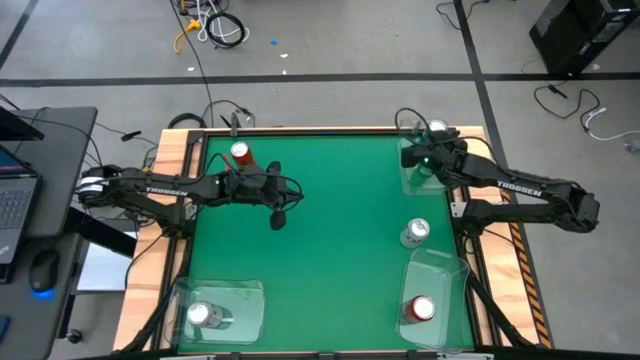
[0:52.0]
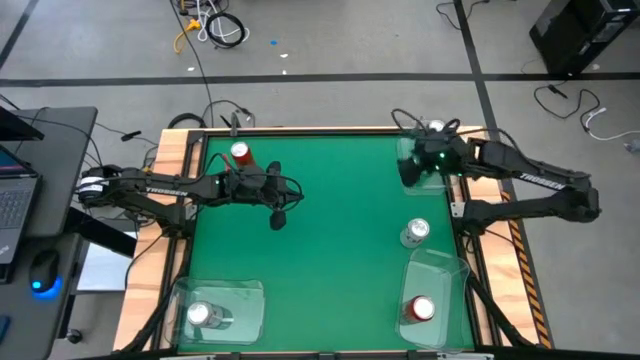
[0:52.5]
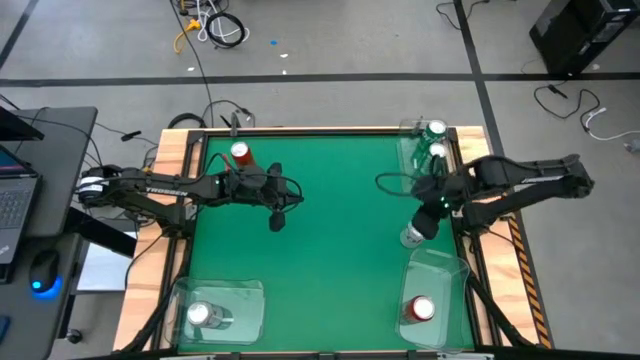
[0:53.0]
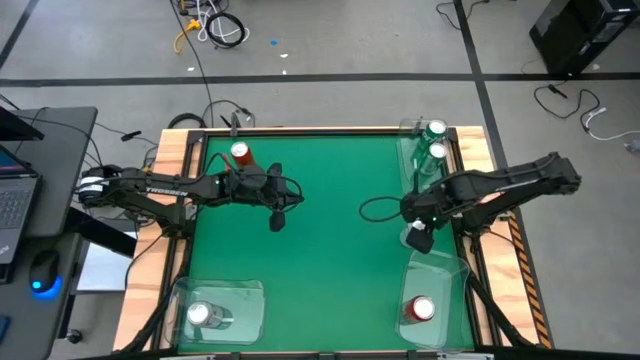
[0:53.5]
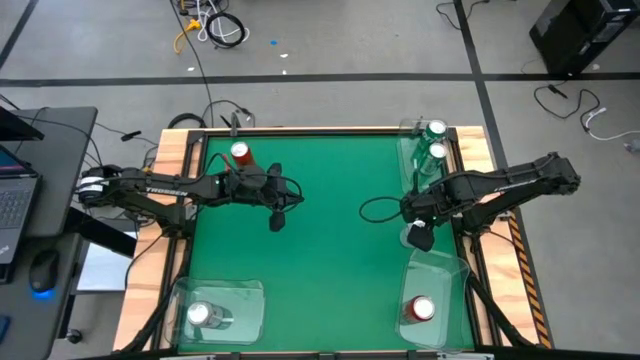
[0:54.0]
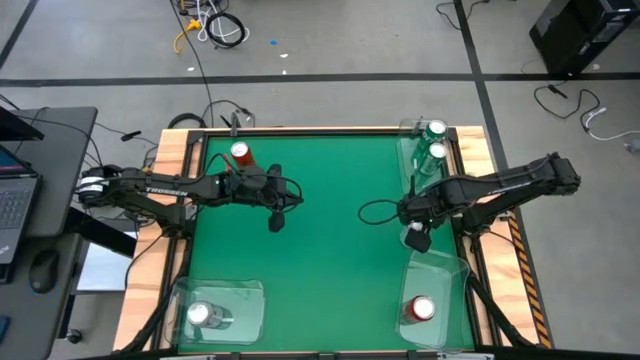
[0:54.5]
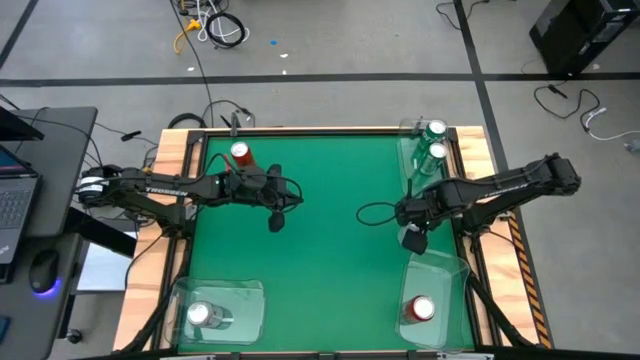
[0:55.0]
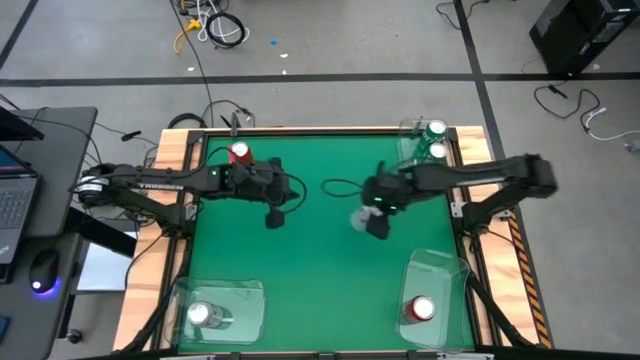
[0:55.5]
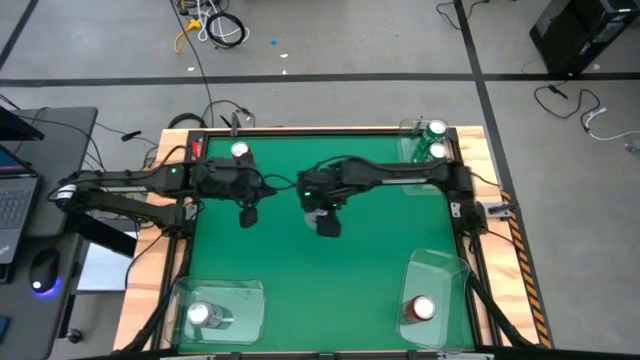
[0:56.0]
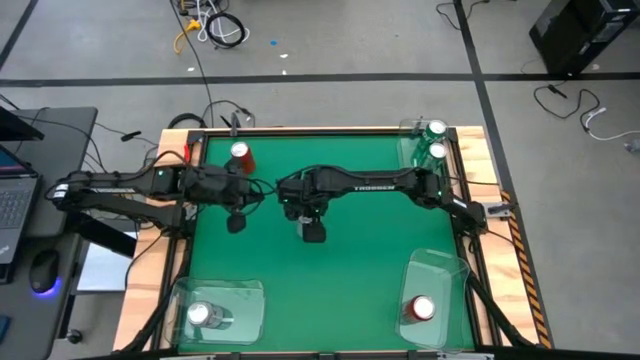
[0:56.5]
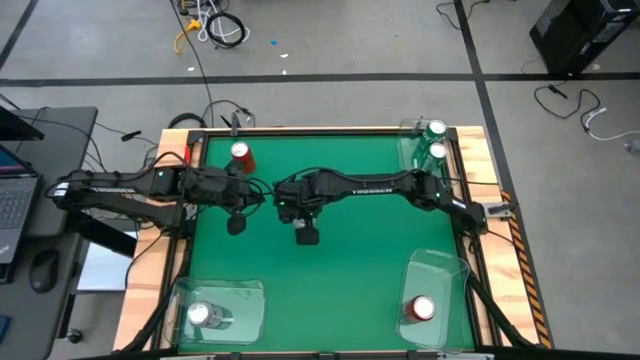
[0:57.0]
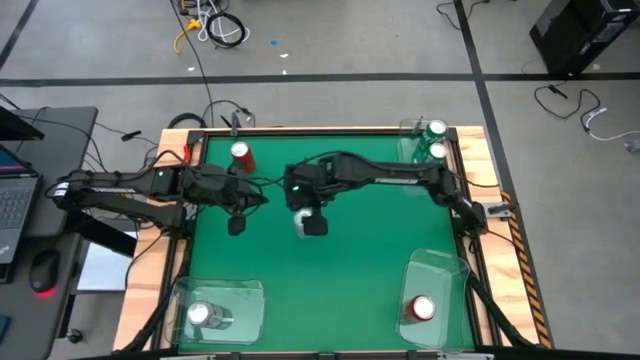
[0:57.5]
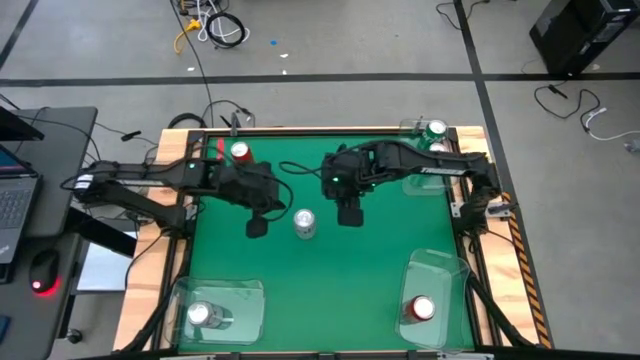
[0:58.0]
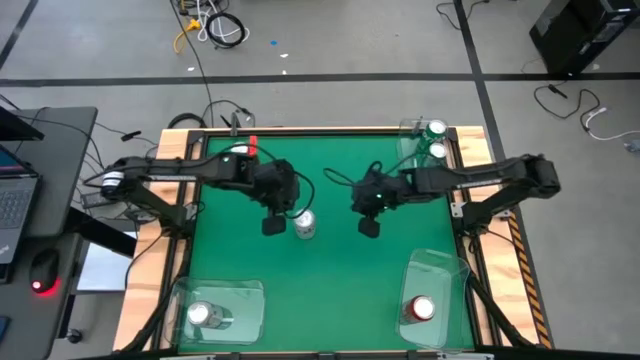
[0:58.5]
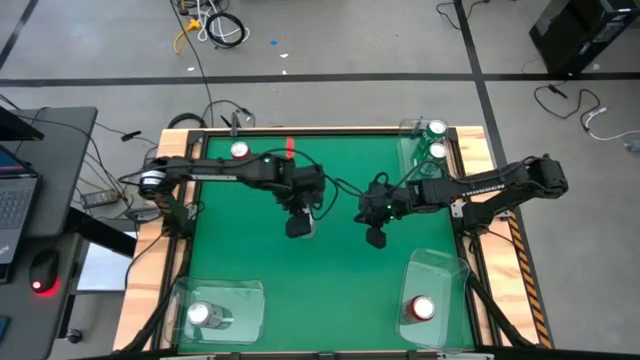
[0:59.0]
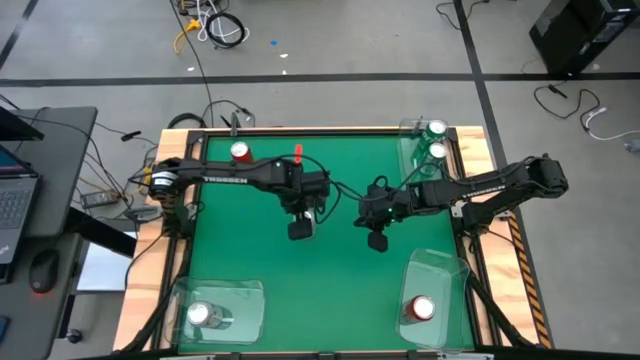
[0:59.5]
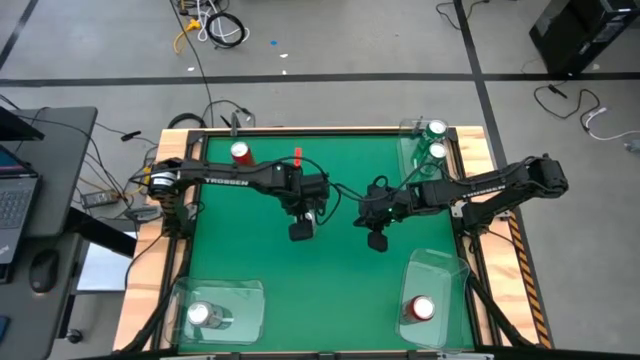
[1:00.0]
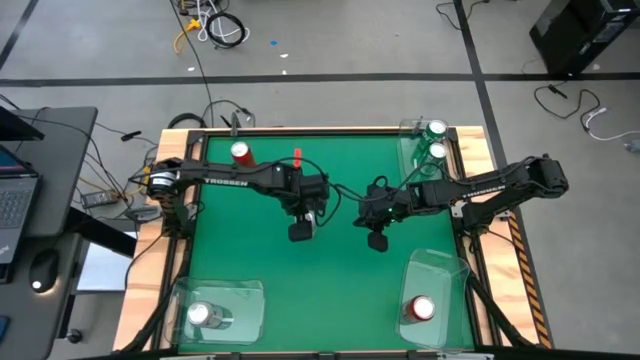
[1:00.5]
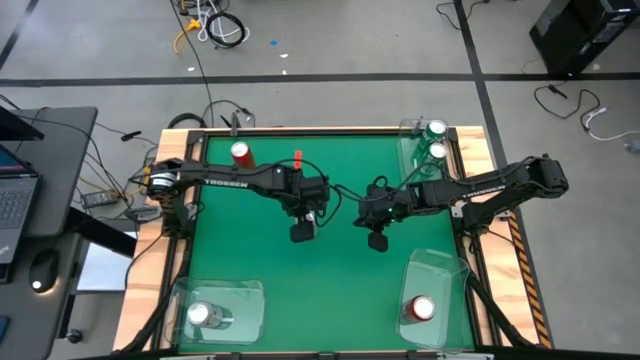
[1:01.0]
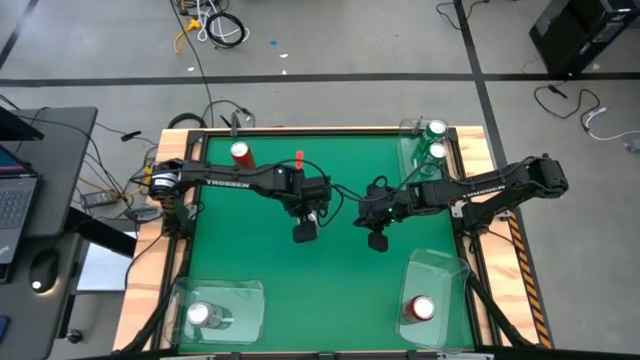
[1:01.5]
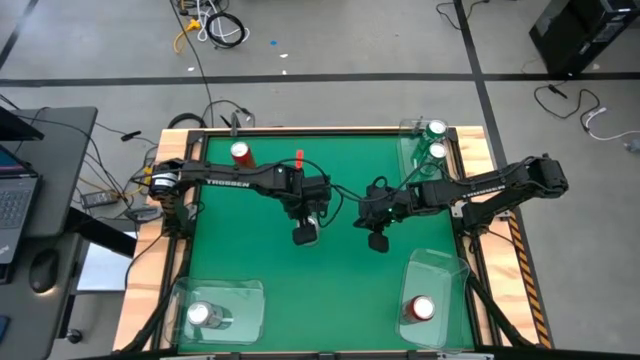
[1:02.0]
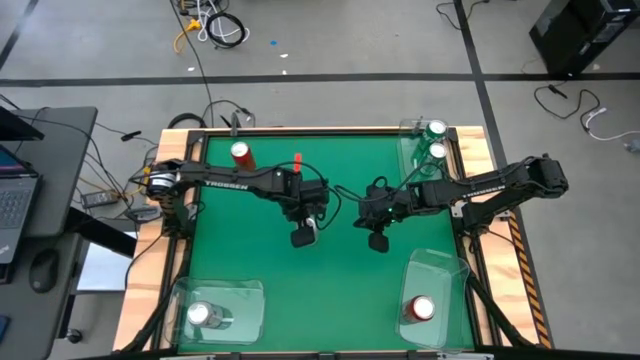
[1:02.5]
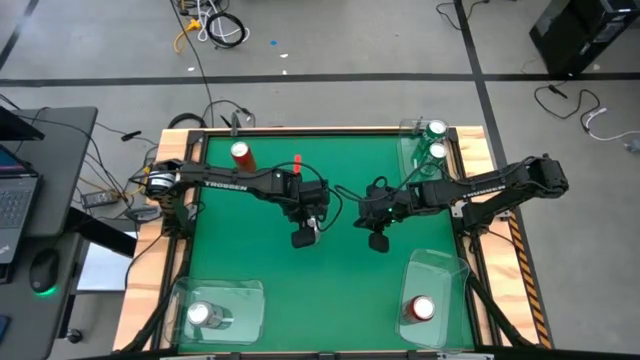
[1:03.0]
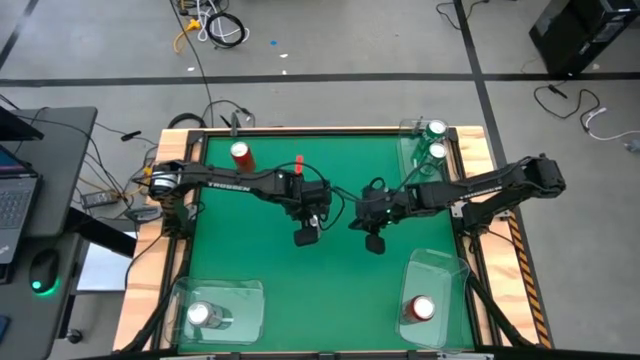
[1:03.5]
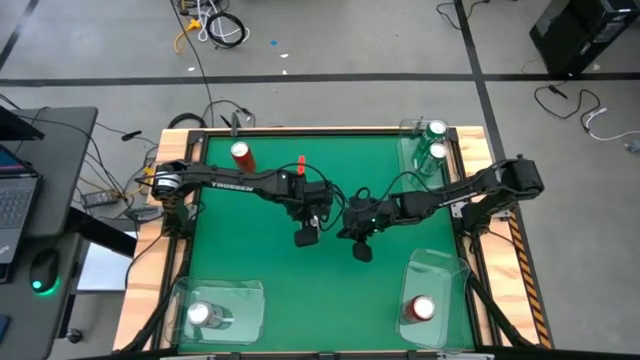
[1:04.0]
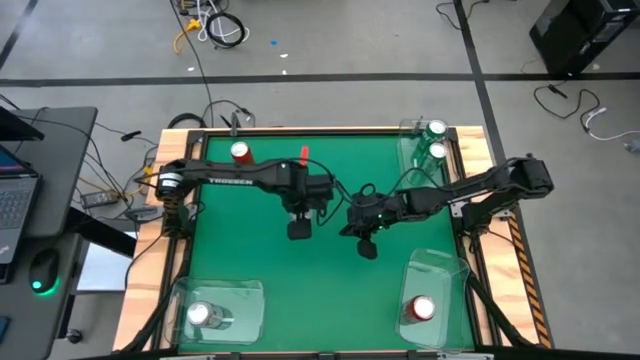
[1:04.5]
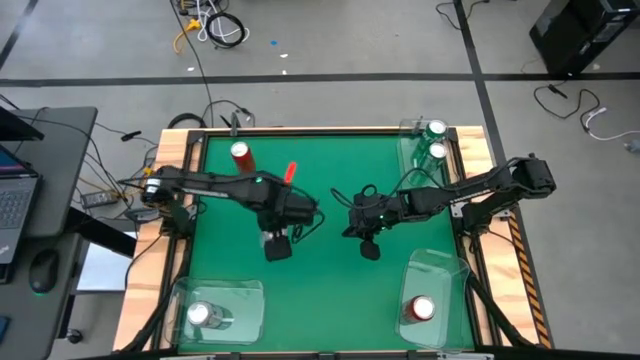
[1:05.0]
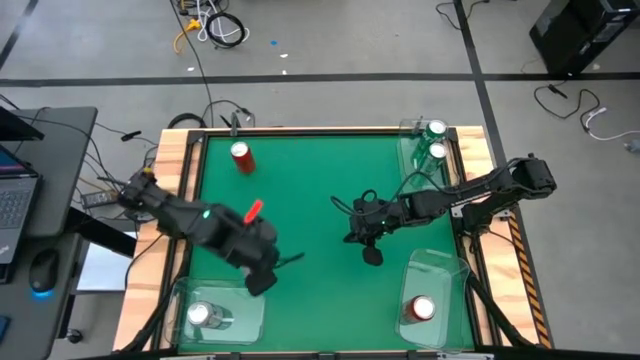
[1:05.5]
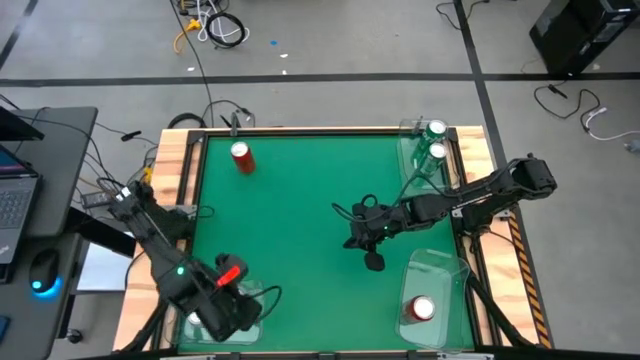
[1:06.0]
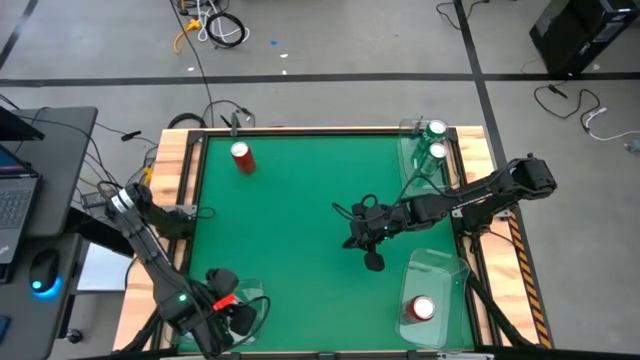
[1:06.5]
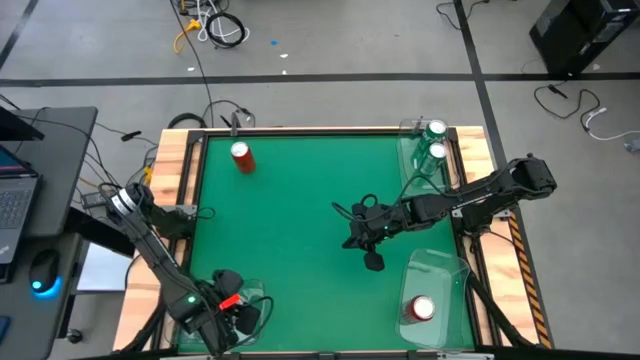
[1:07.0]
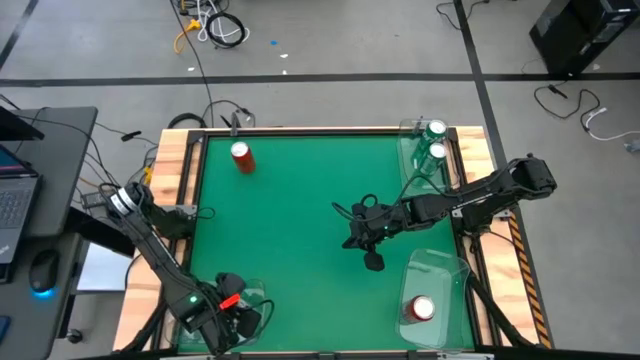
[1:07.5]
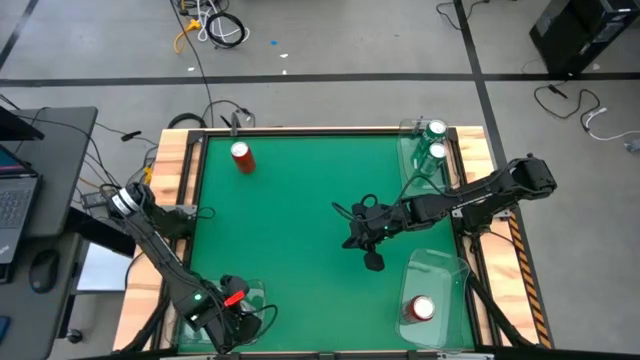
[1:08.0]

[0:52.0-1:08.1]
Task: Sort soda cans
Put the red-silver soda can into the bottom left transparent bin
